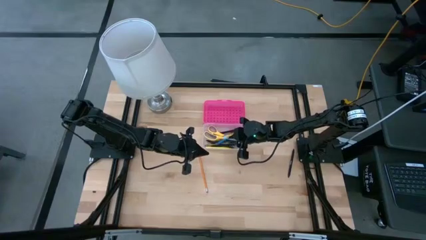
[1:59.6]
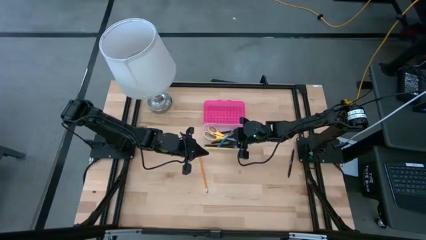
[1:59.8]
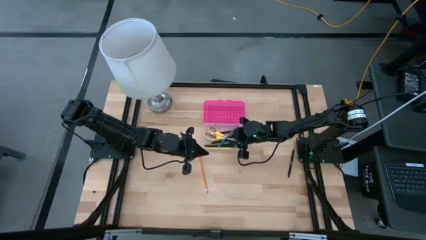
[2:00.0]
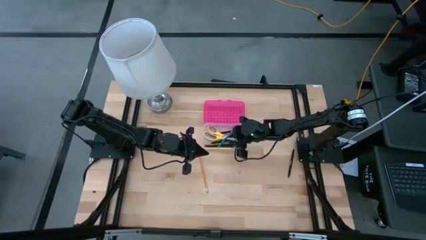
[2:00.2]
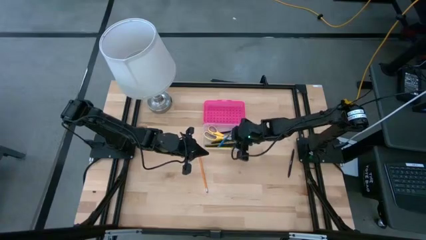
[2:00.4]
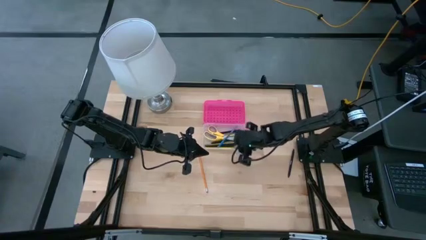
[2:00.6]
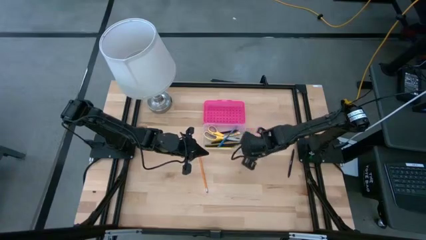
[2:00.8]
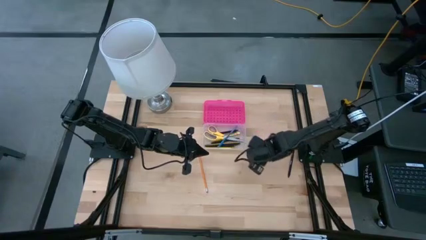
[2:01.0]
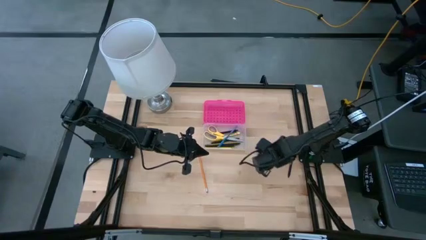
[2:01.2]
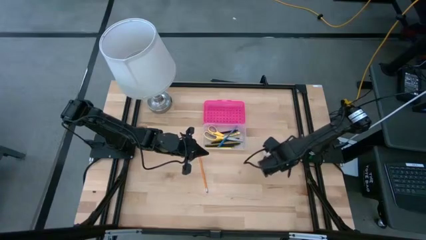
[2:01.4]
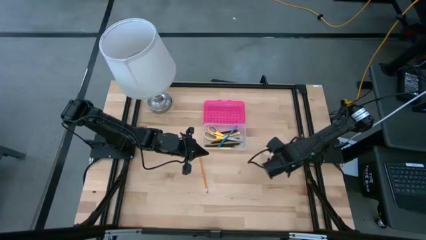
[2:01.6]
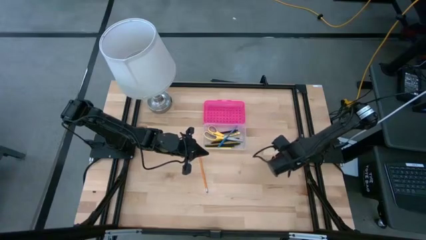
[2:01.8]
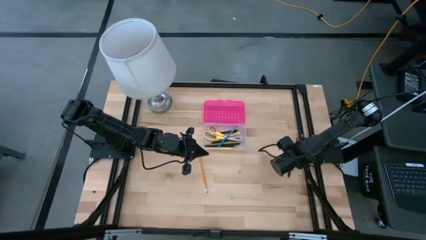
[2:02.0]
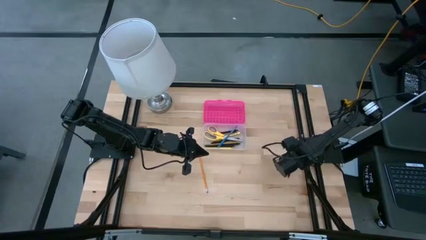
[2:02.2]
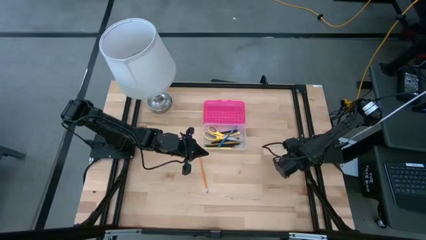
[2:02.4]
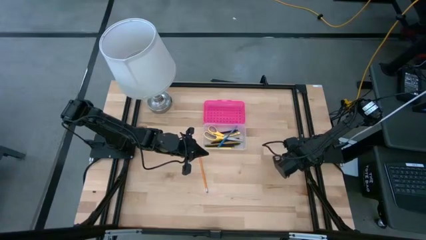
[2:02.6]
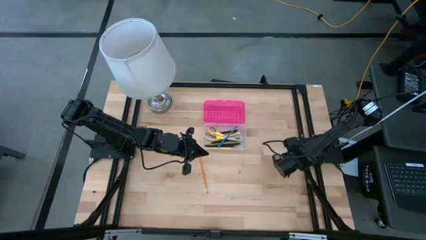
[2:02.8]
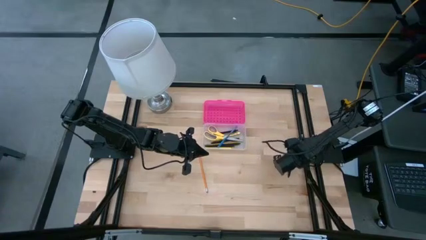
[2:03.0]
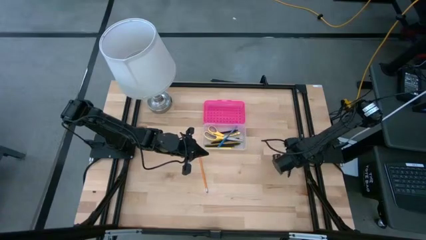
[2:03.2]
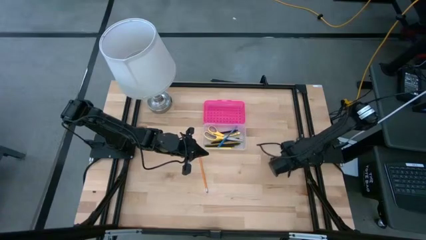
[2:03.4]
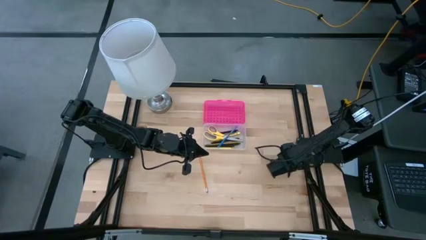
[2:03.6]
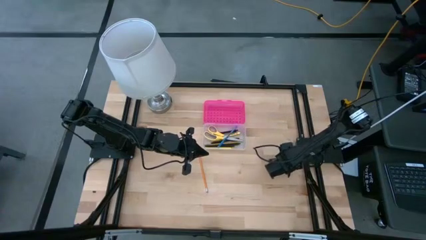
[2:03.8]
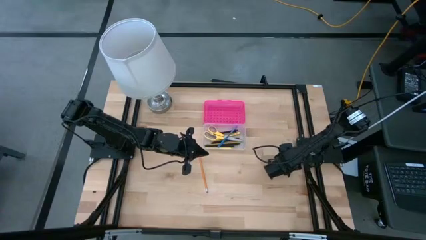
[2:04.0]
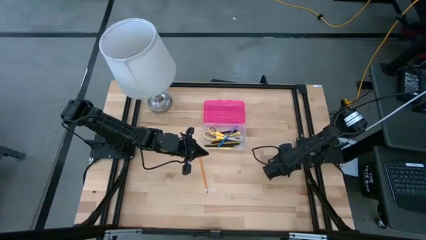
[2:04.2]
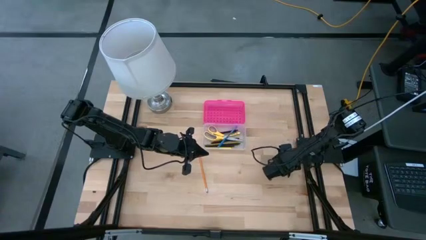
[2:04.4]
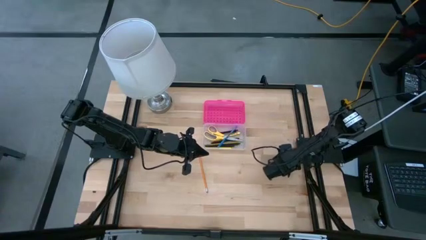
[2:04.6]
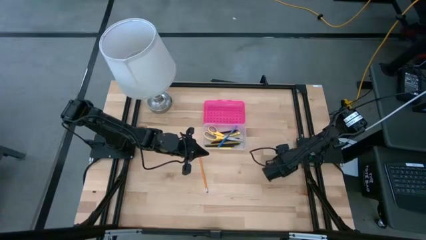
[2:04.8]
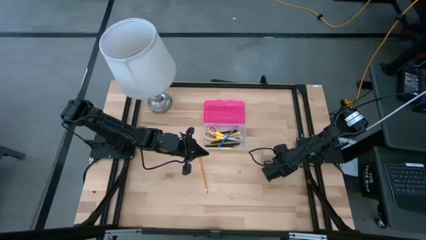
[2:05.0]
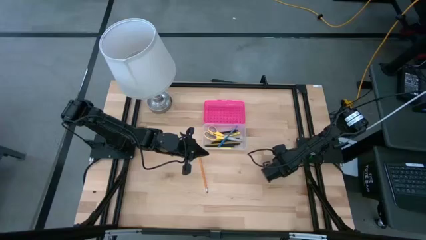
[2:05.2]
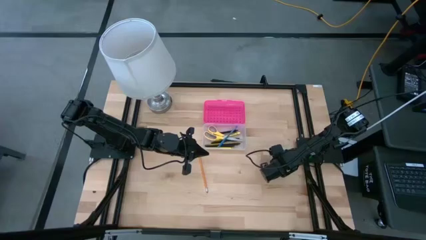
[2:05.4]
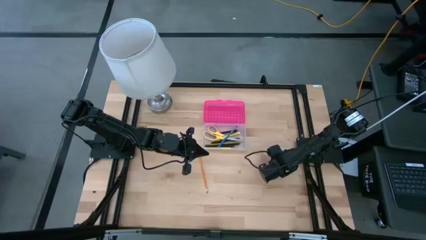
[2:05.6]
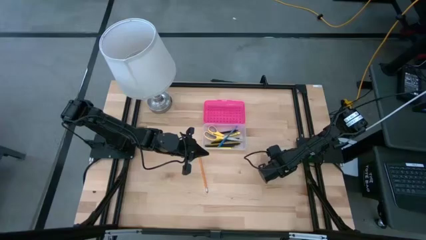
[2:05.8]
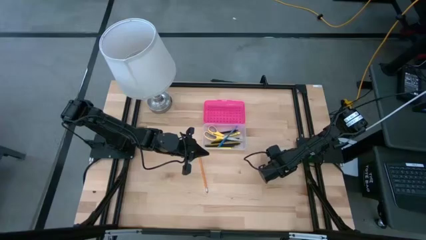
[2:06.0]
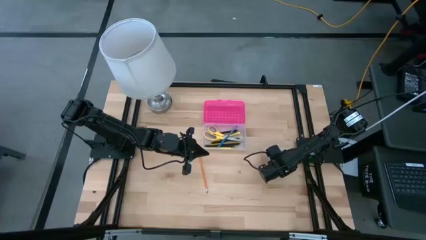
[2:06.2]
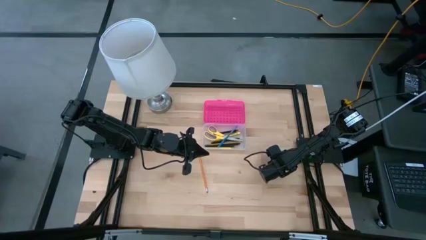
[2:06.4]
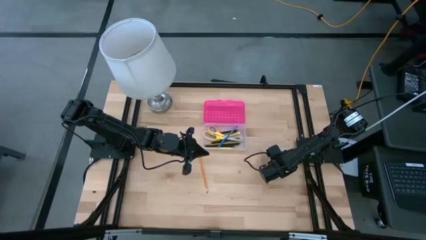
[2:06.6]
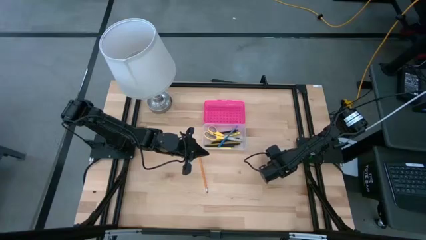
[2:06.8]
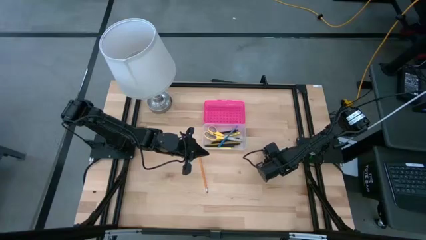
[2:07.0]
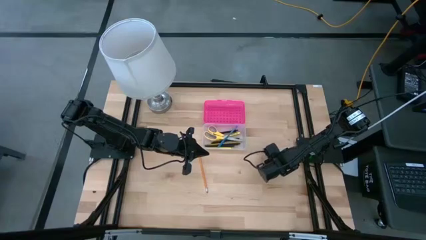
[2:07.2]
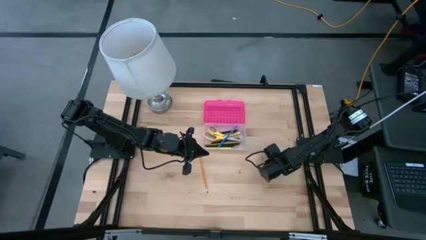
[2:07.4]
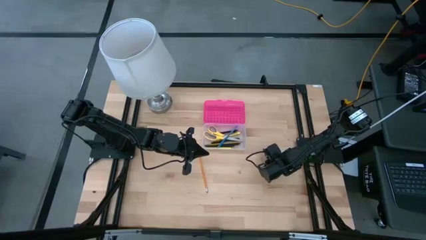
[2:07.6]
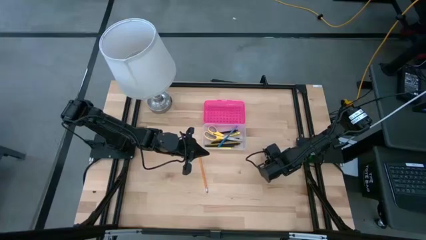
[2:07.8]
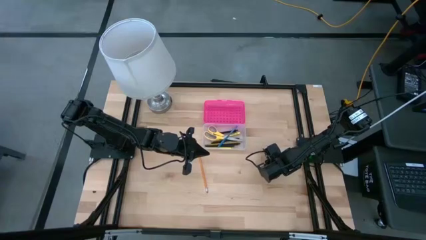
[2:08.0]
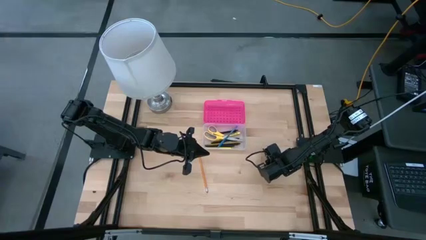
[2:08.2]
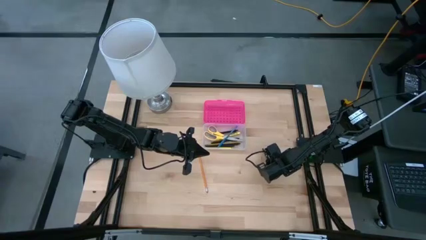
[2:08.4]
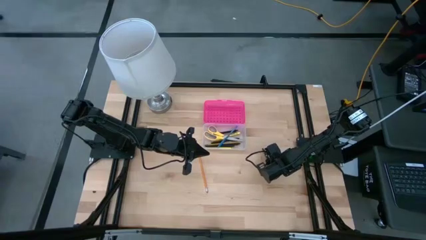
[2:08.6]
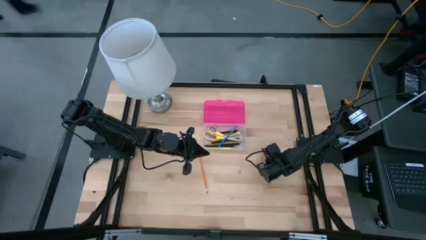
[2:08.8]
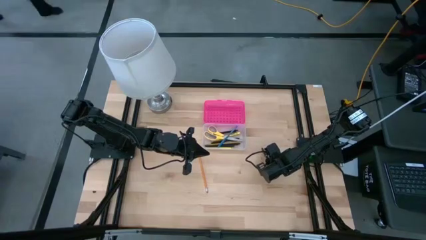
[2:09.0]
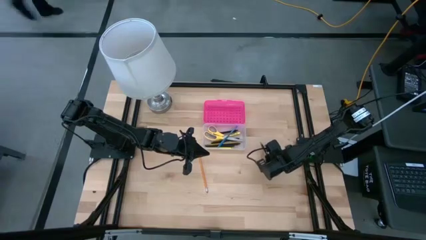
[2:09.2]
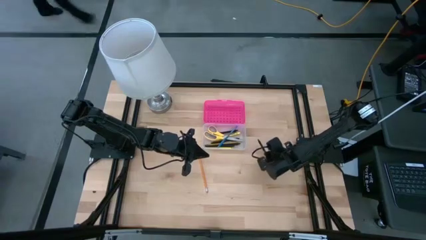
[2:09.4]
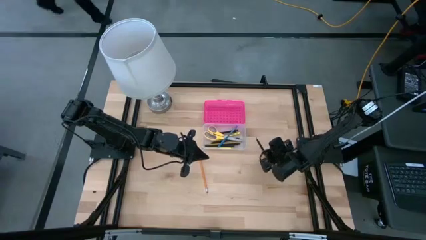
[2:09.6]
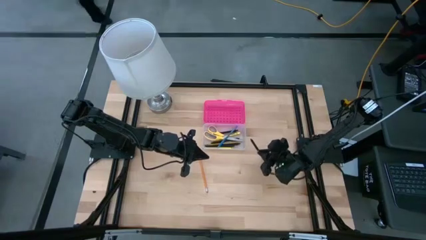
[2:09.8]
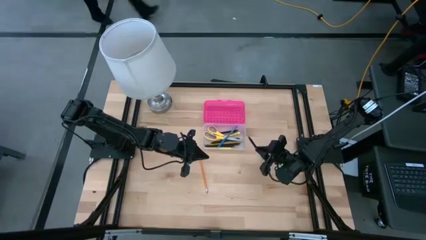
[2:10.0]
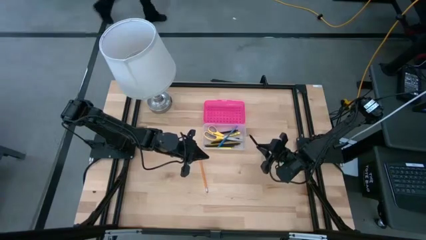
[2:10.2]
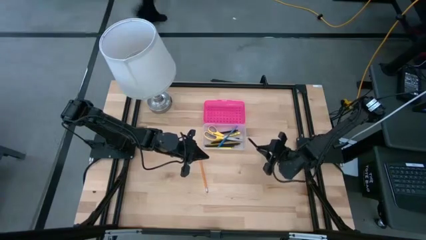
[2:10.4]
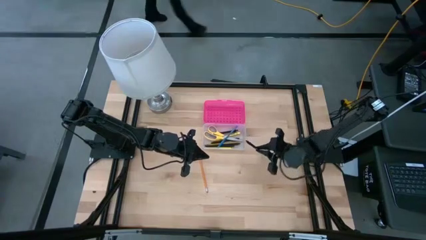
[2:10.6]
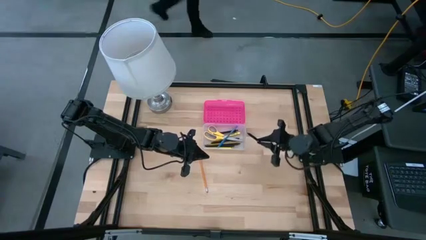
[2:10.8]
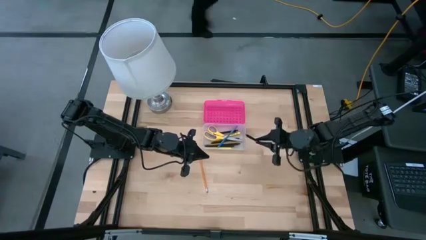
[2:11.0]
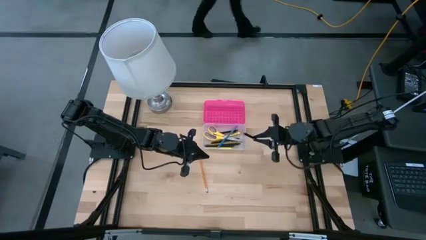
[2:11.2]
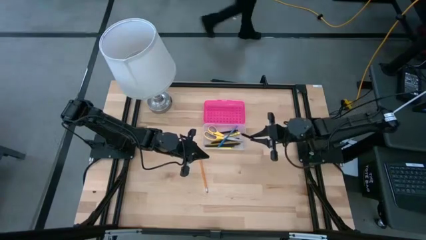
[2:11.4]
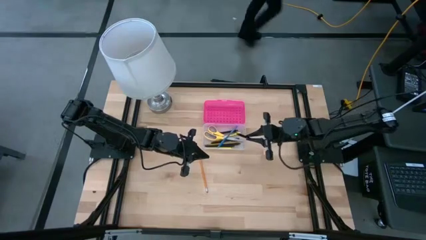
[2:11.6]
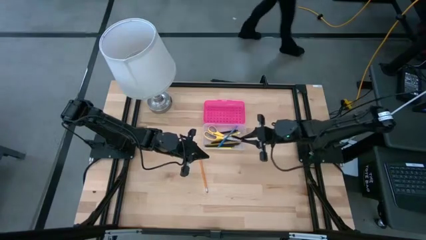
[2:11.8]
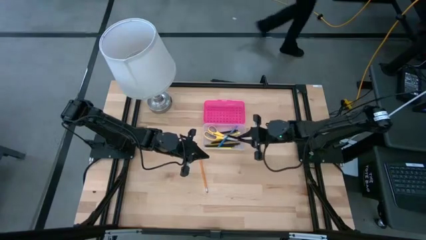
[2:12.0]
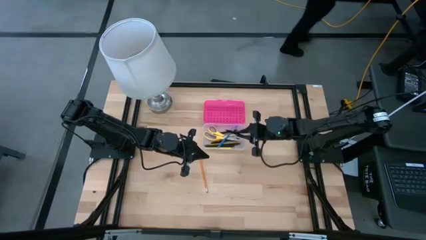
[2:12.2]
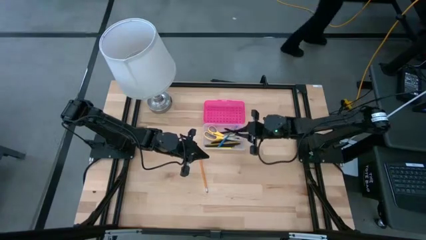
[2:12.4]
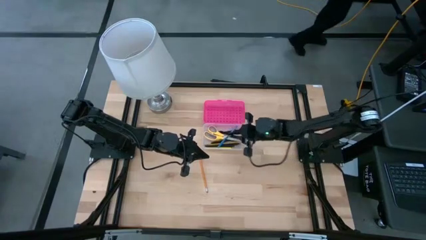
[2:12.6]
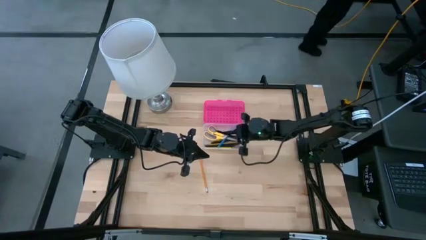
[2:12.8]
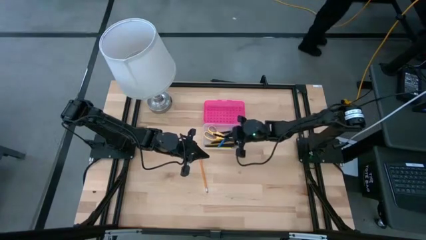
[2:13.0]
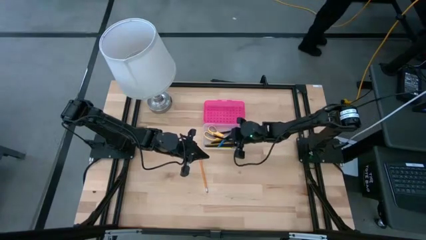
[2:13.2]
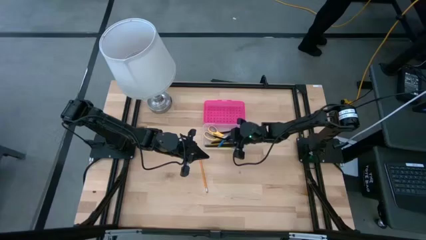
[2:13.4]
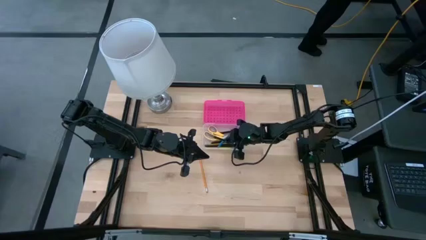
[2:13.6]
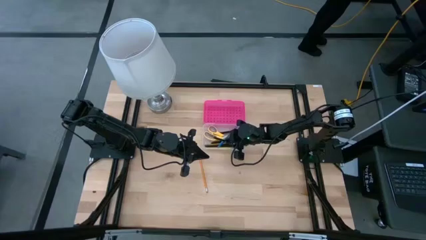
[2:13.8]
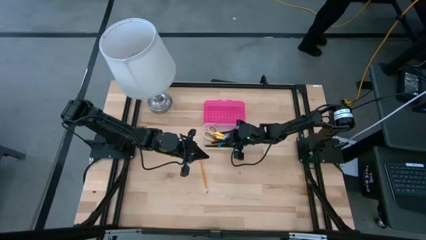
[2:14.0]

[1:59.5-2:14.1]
Task: Pick & place school supplies into a supply box
Put the black pen into the pink supply box

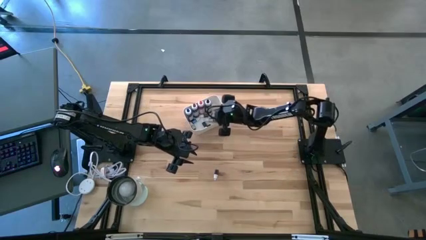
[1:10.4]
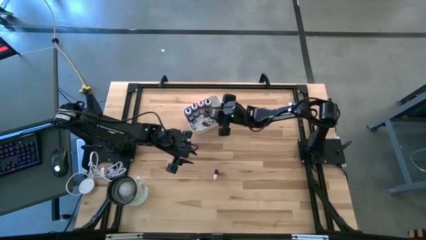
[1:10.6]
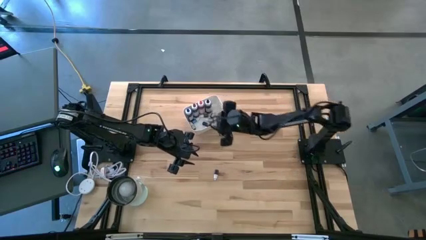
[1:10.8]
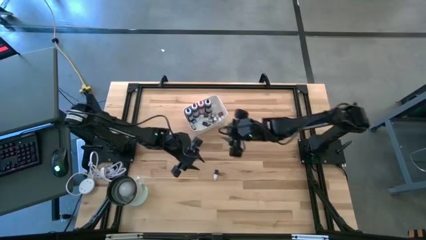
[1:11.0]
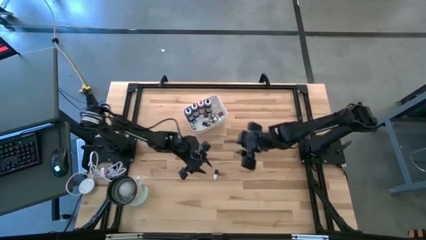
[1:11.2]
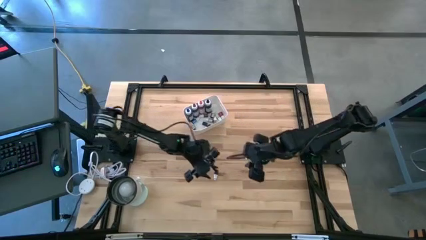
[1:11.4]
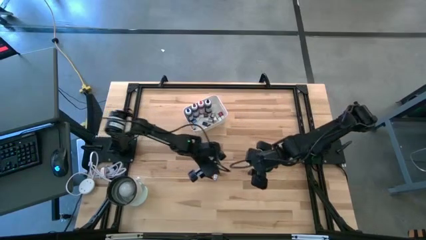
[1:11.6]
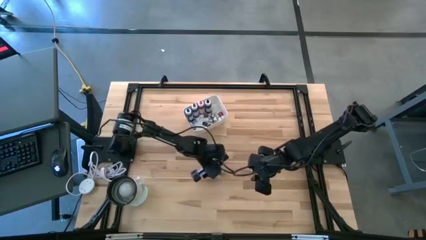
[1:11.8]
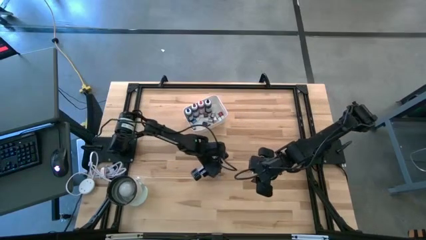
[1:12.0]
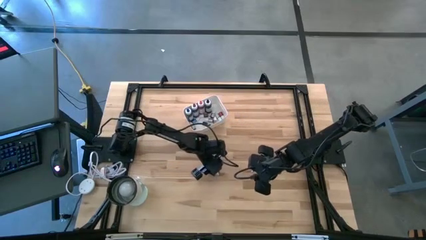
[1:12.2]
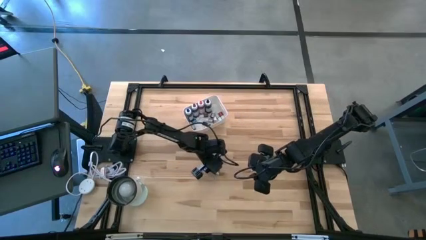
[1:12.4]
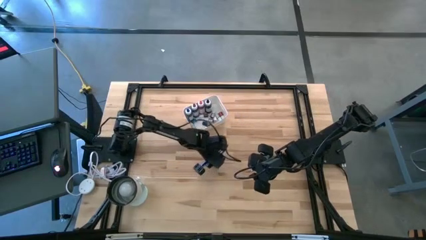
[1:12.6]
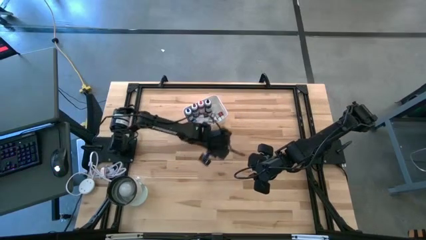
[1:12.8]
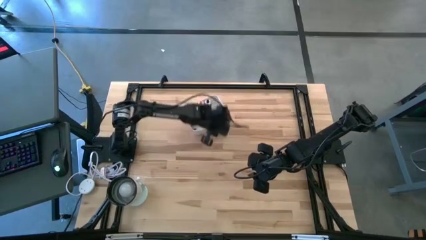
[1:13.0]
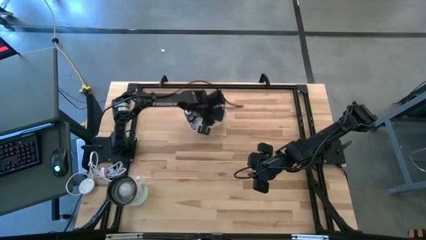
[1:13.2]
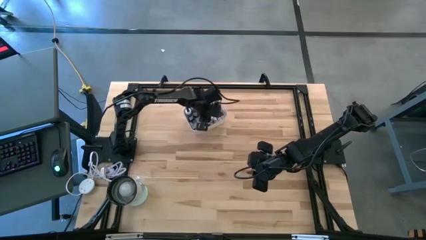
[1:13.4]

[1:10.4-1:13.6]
Task: Pick & Place food coloring
Put the small brown food coloring bottle into the white bin
